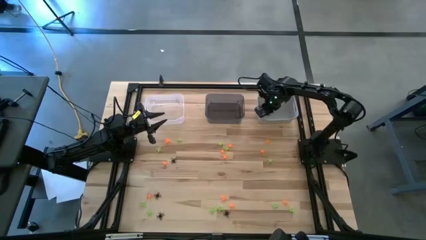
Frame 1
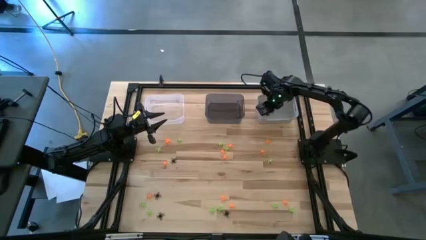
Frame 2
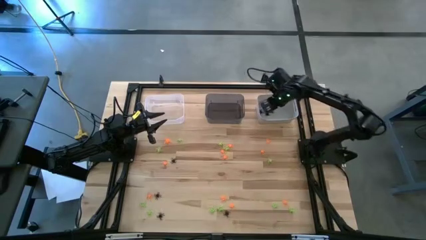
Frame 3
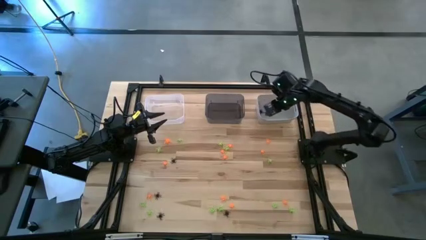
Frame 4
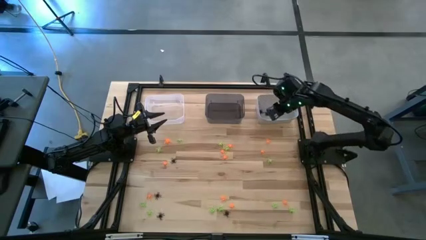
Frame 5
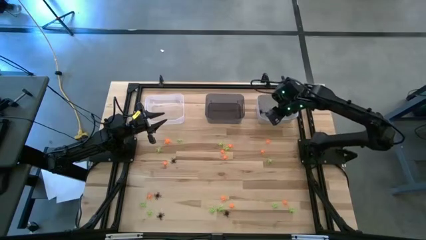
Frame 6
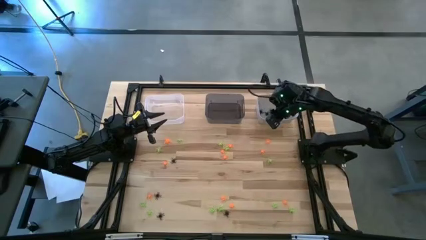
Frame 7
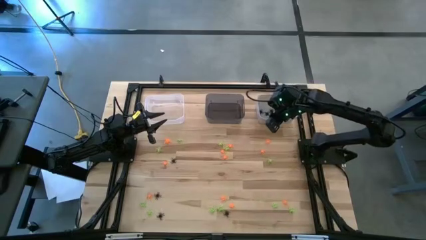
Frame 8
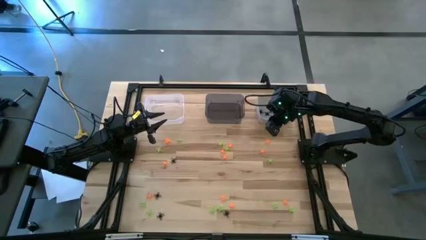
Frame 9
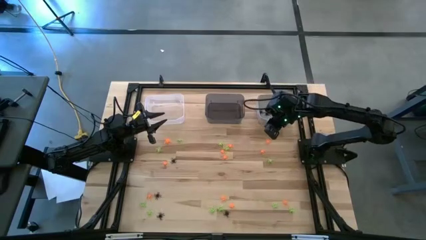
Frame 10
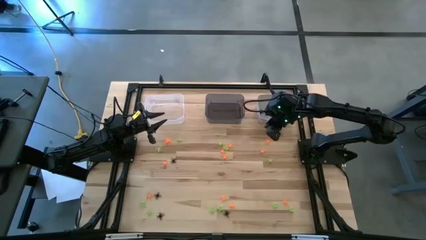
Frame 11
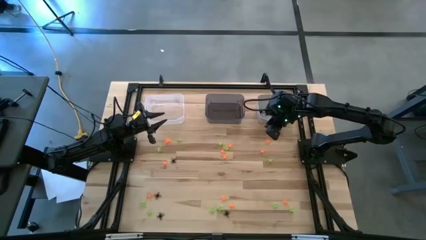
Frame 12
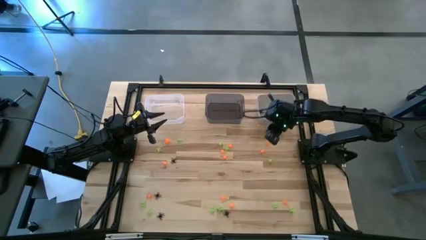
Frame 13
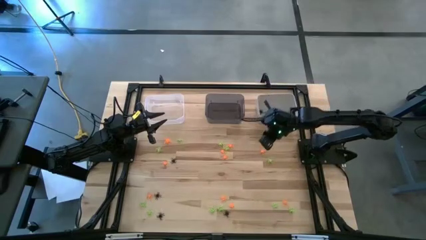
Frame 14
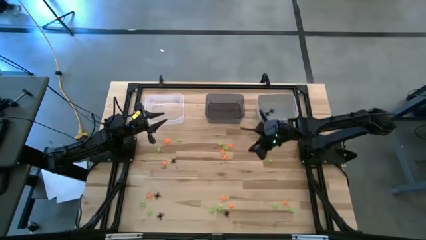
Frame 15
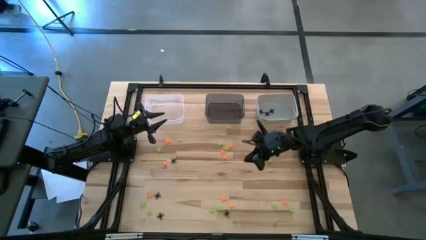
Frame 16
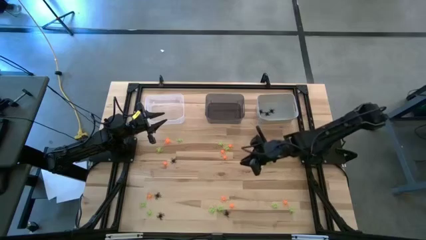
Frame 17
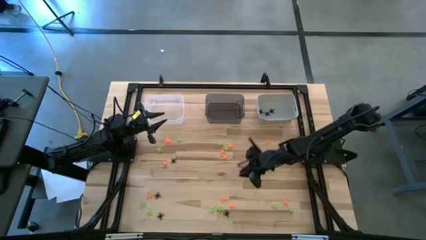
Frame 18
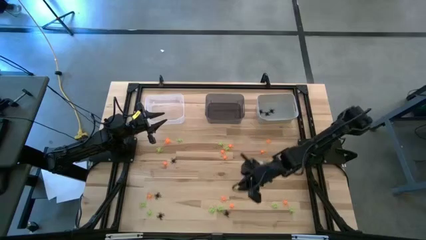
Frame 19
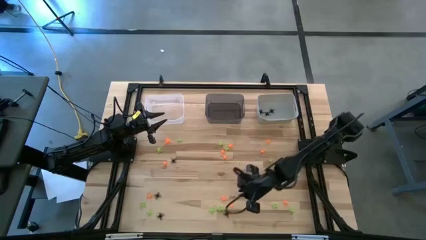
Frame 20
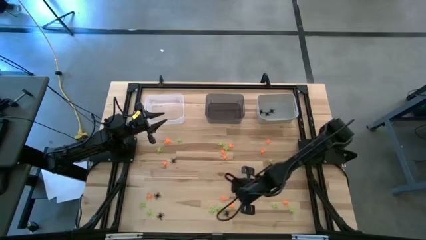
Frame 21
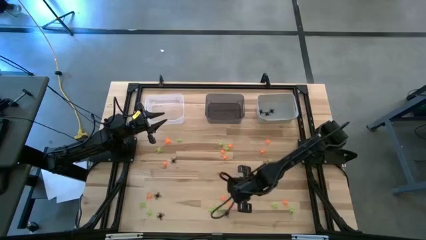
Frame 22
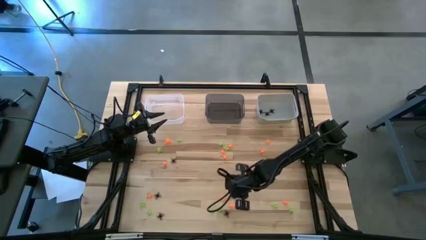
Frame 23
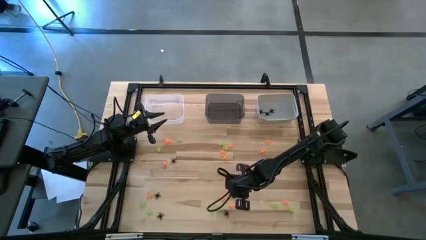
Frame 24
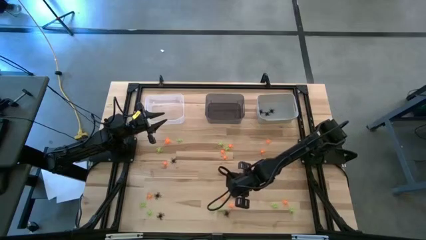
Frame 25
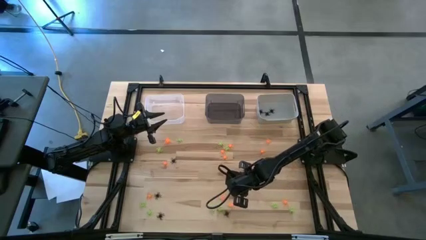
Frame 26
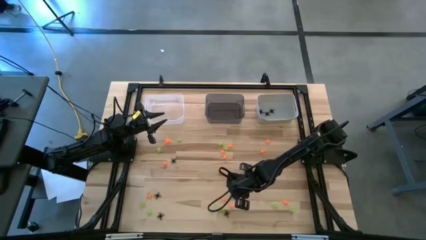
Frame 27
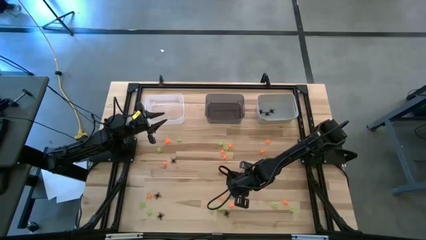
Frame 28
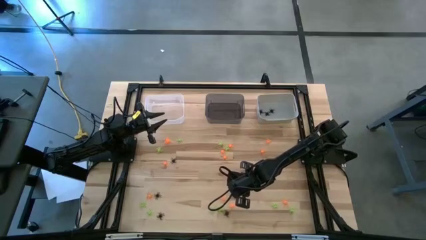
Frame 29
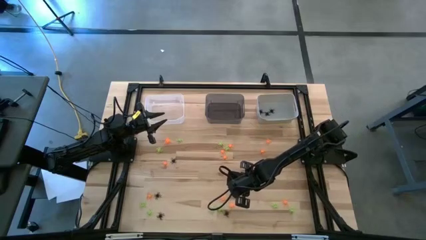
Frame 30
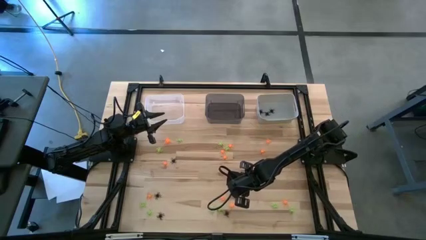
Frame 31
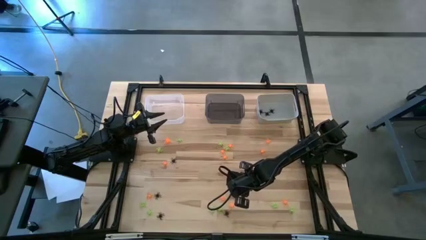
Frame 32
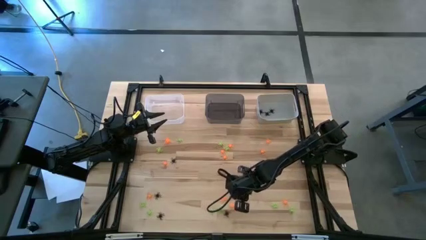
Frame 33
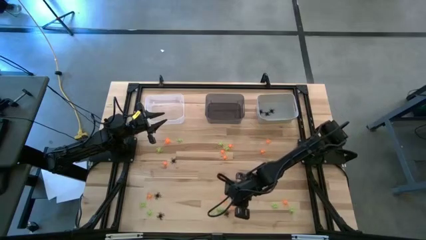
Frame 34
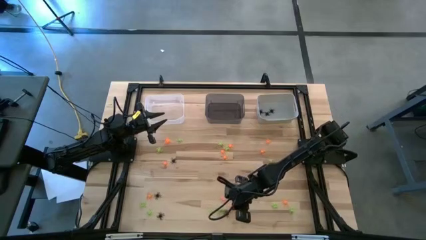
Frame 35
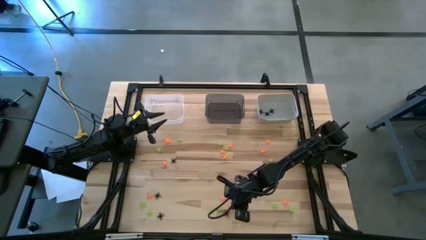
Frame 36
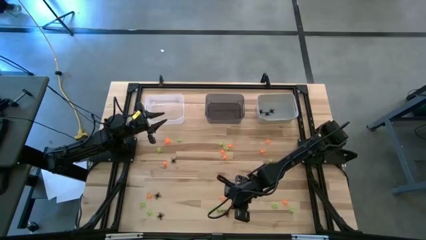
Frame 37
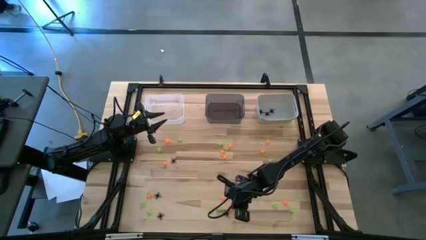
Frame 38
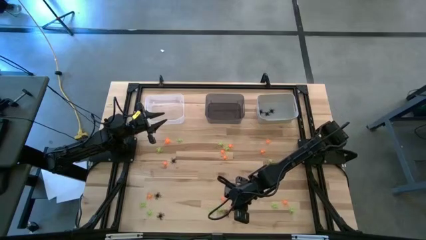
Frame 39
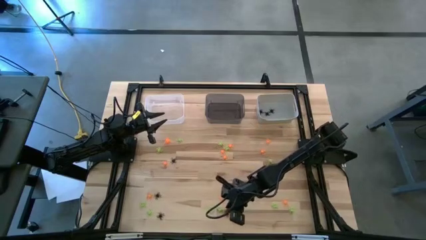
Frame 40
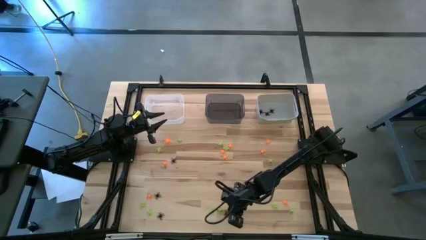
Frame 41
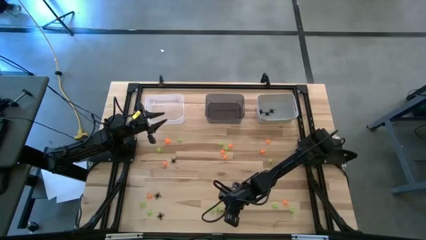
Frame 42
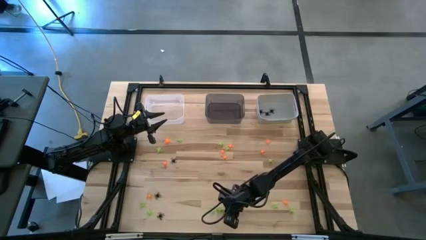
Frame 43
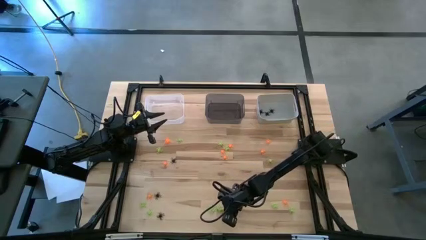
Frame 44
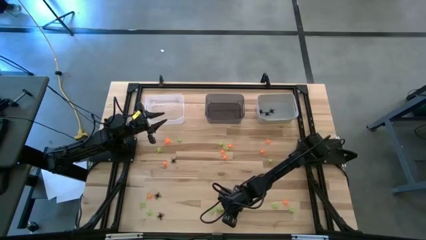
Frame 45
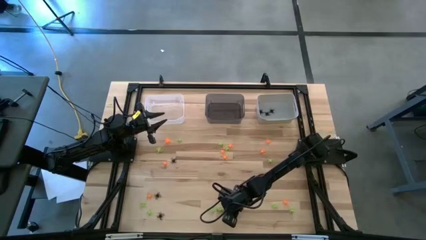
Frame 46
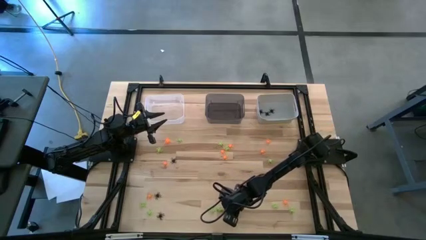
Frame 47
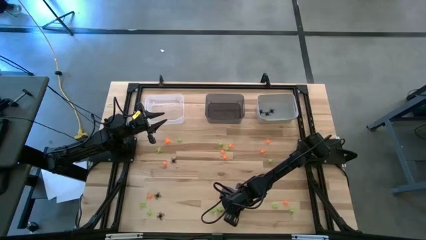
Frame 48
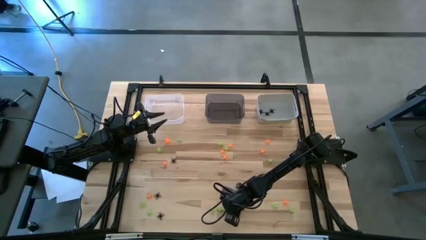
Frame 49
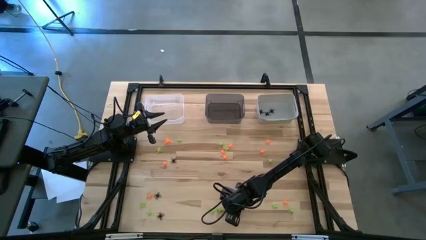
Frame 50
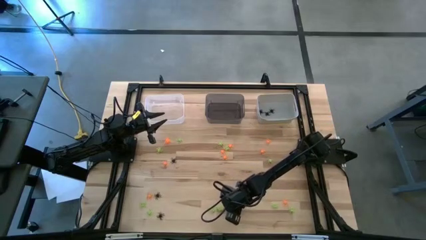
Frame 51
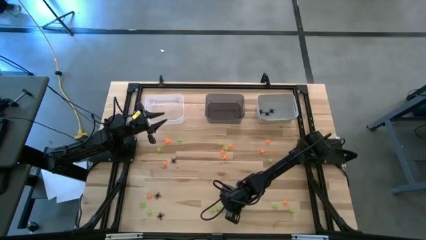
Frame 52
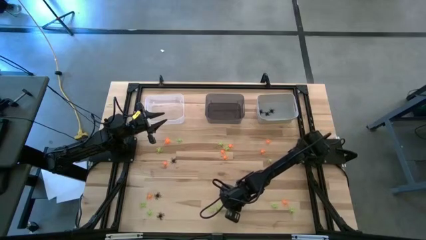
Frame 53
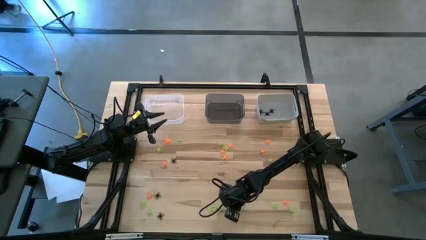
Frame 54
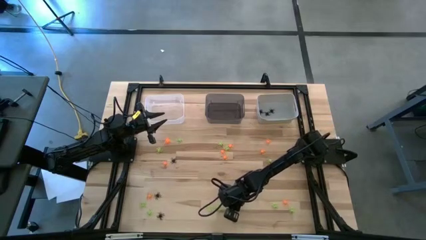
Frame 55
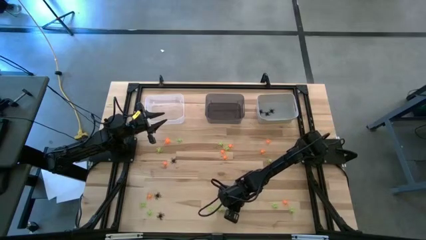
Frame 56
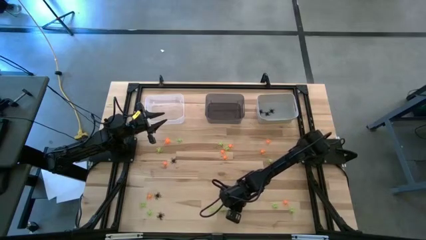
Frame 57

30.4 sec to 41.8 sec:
Task: Sort Halloween decoration
Put the black spider toy into the white bin

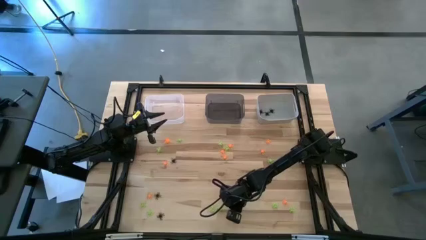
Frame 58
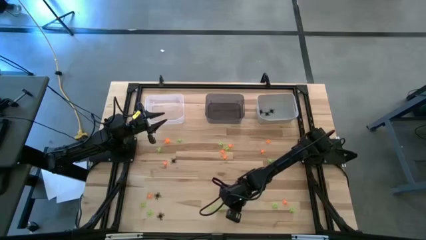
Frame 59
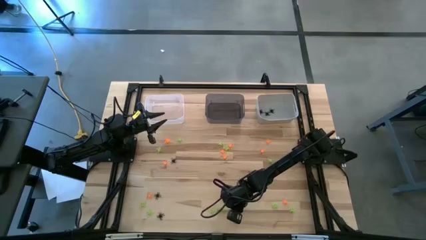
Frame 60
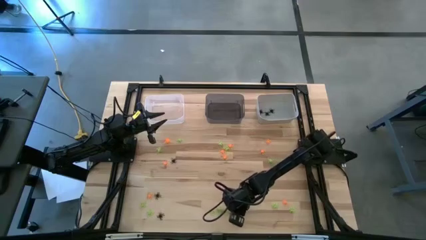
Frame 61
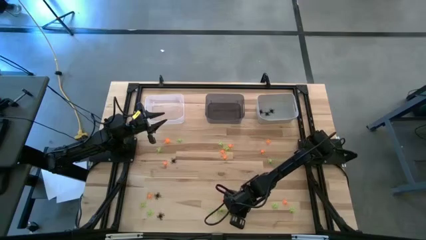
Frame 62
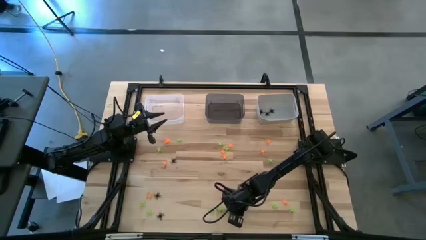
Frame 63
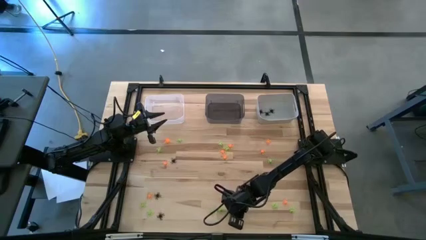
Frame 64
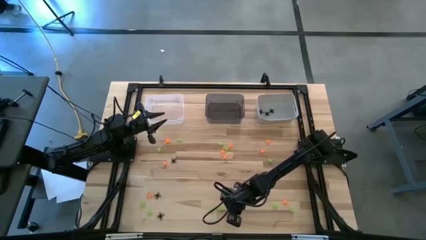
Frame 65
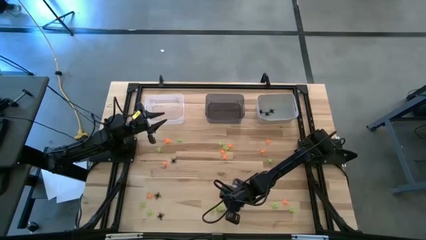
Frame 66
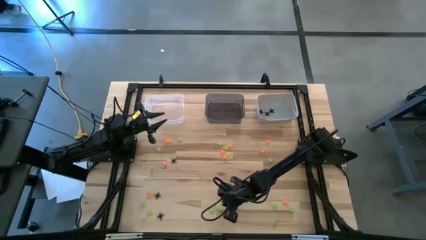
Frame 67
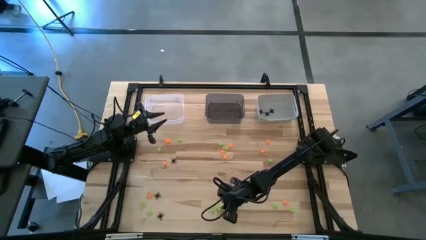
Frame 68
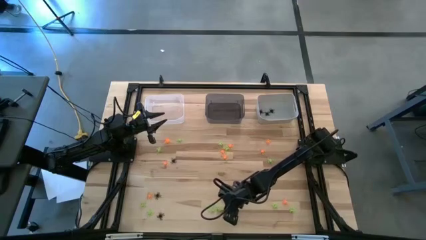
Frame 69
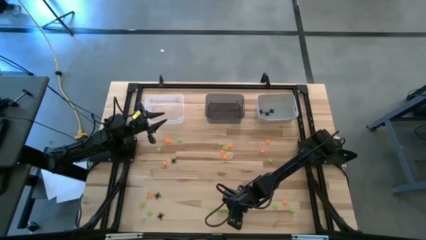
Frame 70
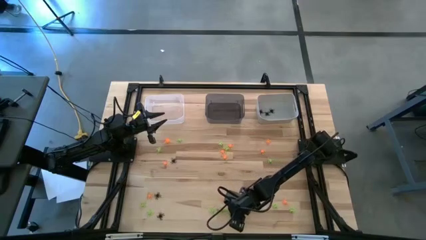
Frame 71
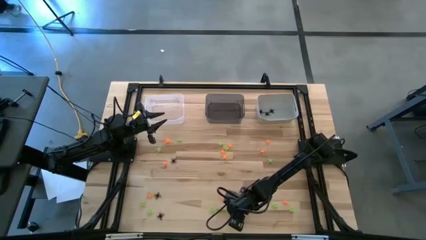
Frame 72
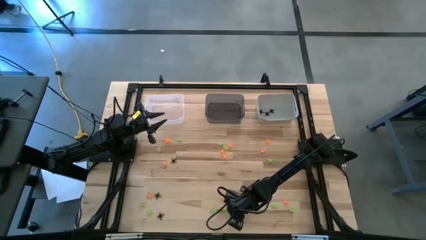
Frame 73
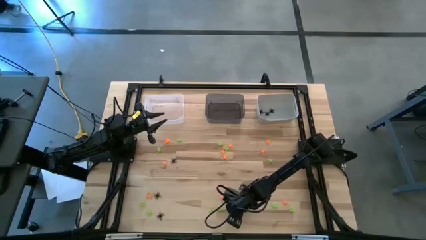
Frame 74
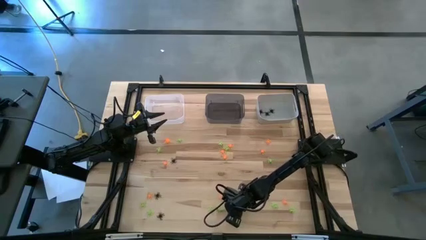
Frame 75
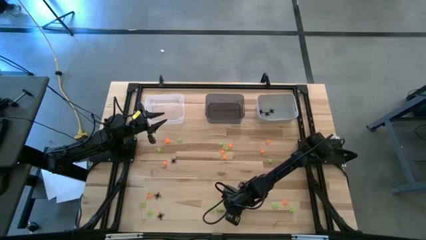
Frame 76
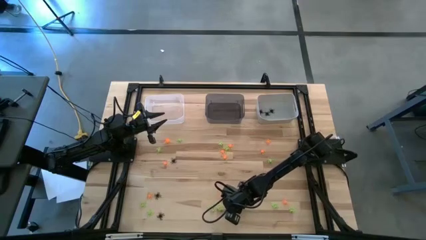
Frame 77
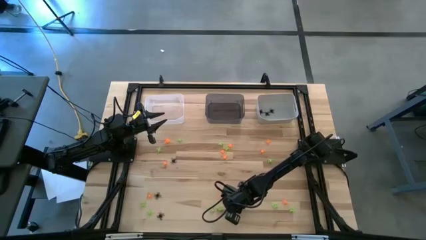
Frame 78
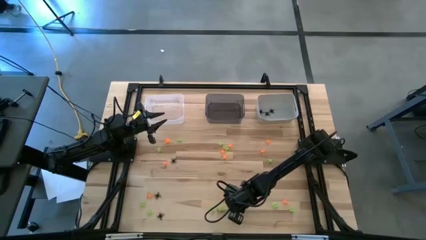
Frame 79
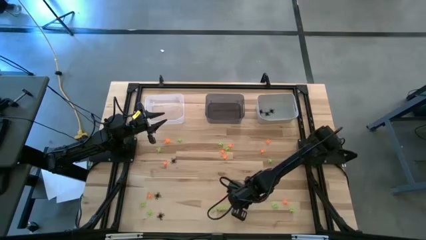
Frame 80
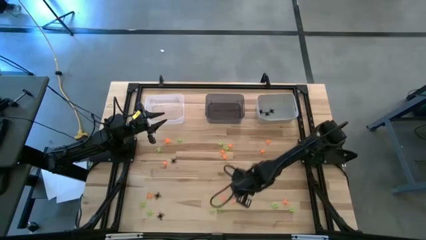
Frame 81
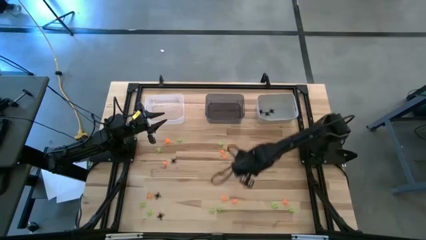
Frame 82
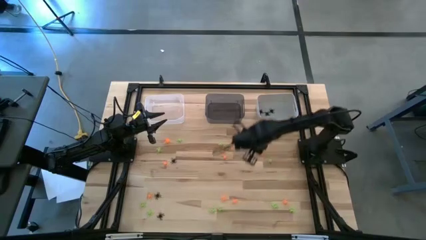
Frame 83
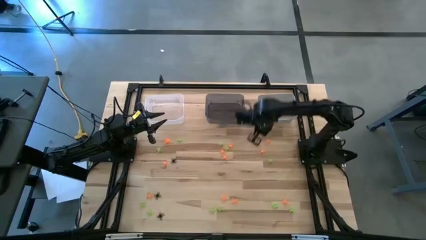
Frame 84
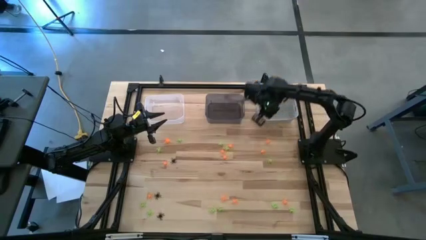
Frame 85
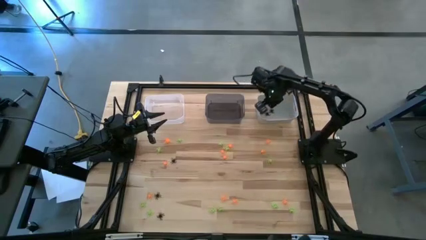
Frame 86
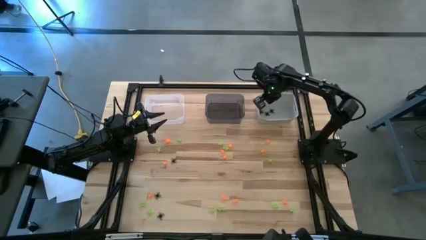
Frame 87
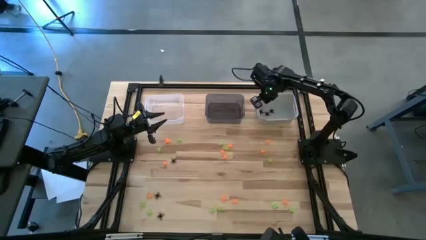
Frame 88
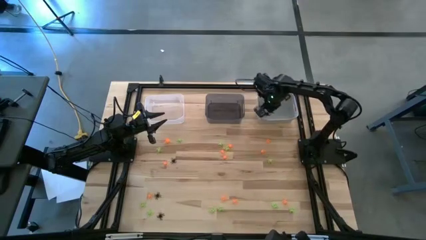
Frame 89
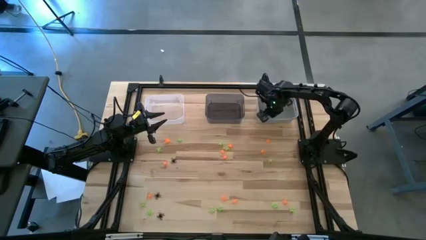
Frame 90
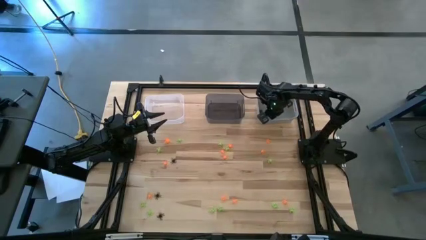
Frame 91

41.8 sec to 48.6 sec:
Put the black spider toy into the white bin
